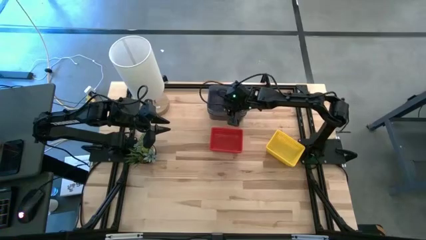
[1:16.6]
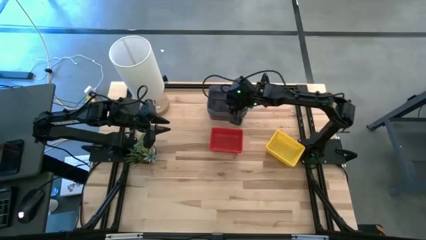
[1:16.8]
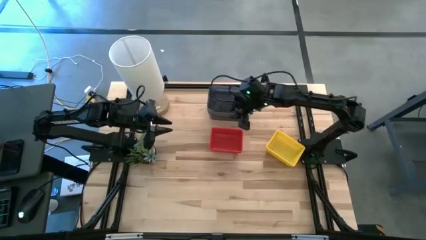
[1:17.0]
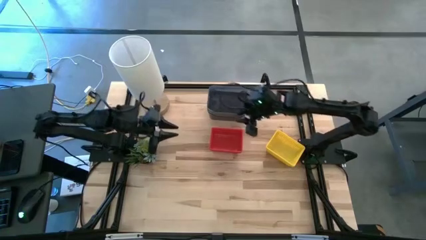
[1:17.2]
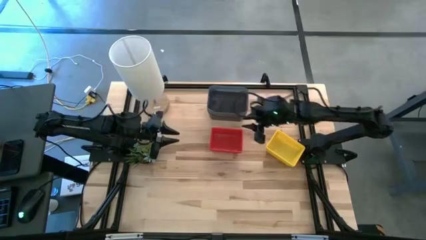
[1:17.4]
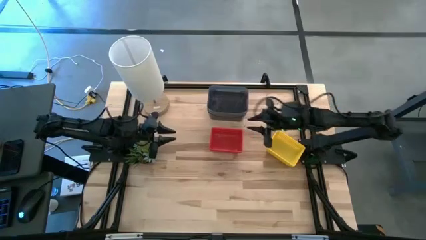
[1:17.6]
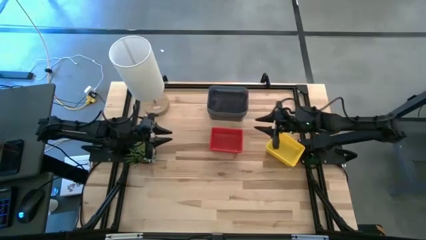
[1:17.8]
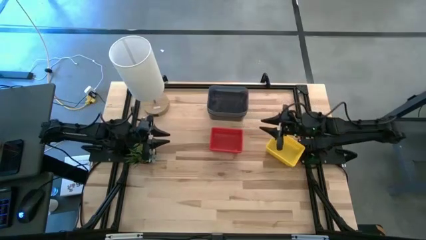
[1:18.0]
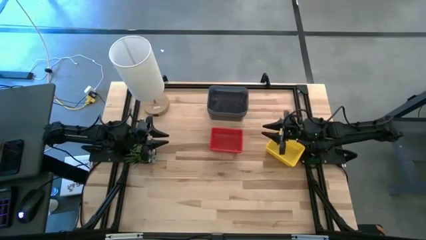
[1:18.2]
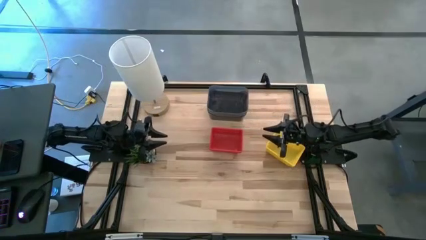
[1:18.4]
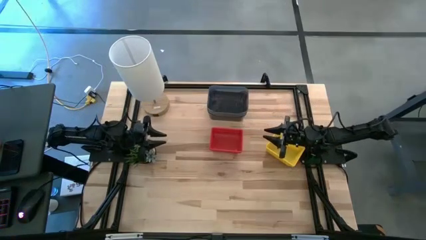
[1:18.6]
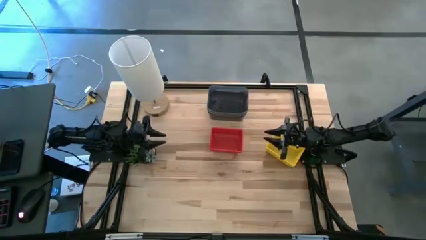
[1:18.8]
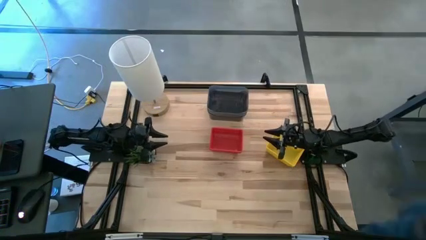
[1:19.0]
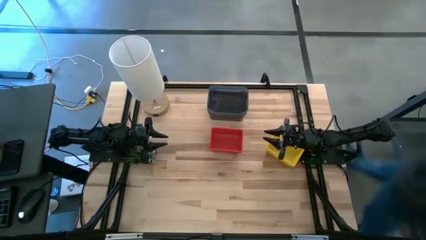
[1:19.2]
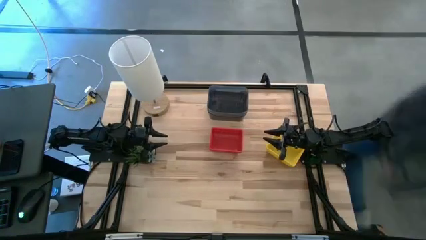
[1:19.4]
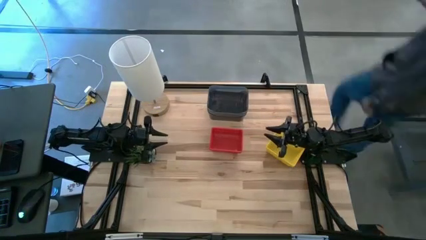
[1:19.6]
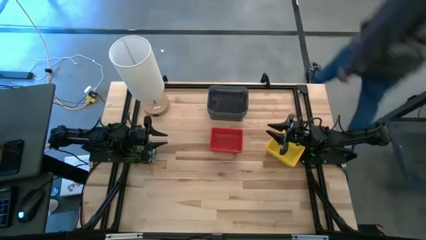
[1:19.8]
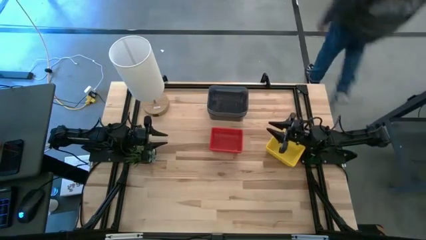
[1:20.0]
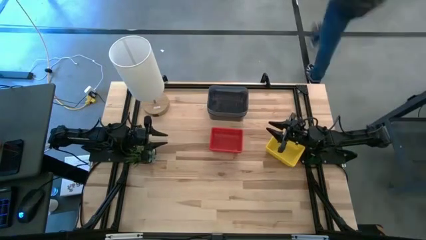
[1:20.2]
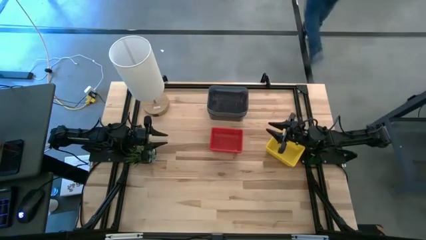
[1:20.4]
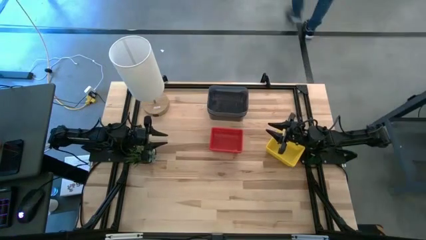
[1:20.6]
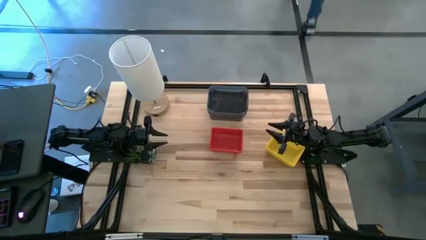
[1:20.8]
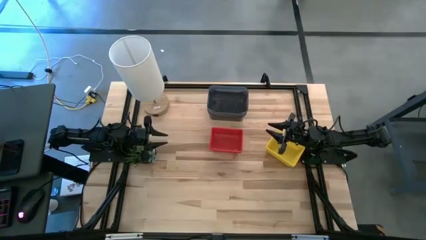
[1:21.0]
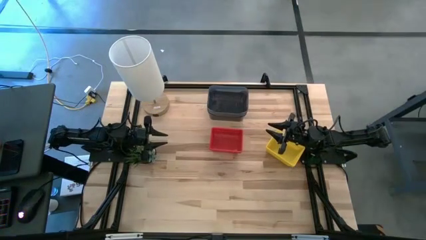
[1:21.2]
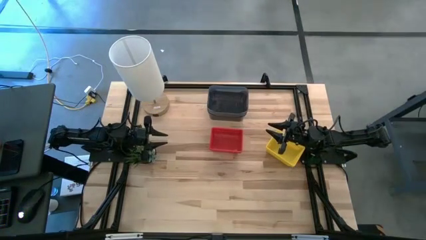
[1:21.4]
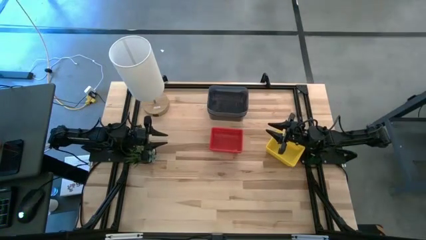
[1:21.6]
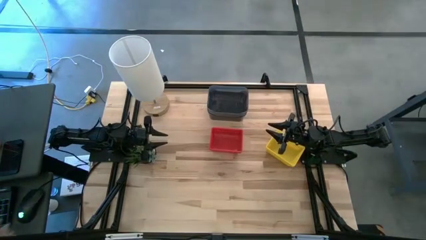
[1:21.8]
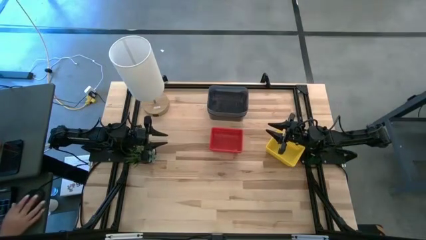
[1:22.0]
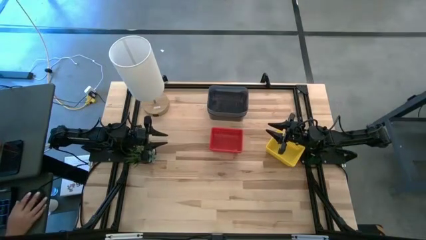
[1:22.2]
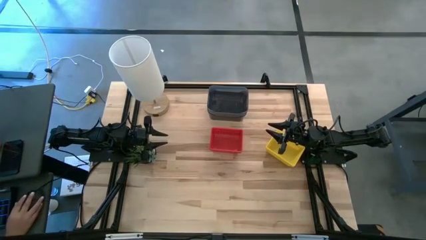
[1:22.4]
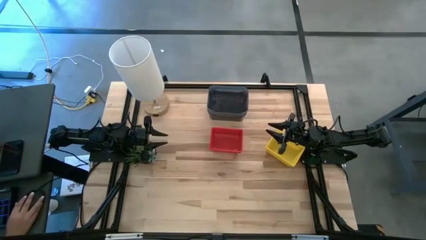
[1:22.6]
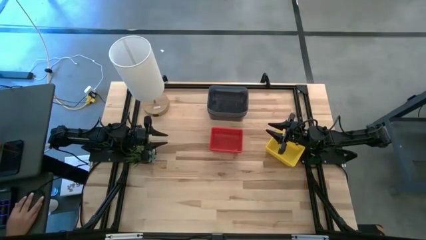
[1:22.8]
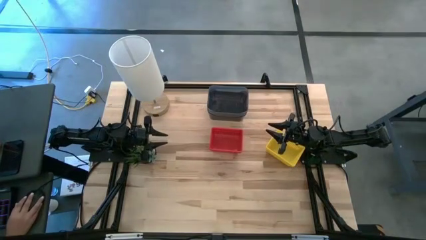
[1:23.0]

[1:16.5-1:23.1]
Return to Home Position

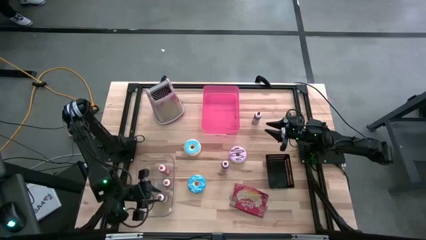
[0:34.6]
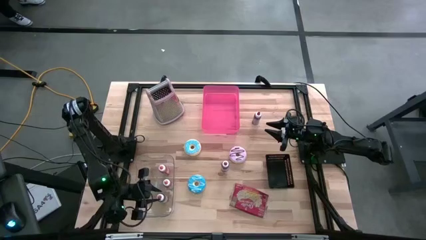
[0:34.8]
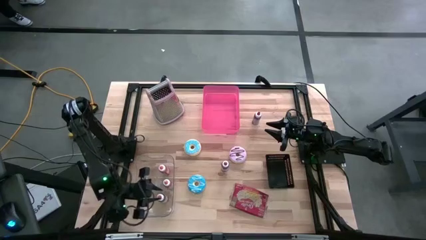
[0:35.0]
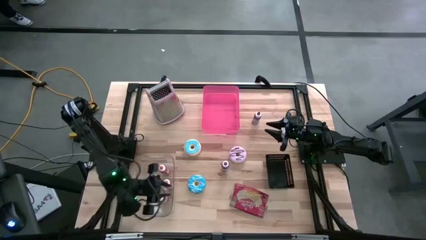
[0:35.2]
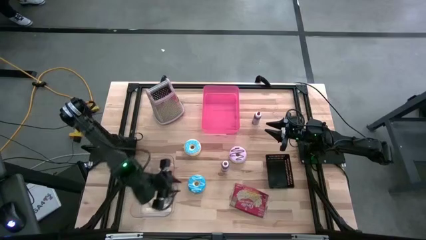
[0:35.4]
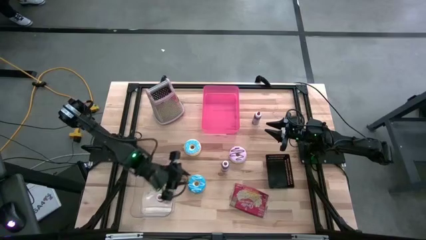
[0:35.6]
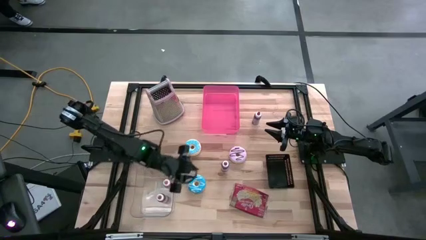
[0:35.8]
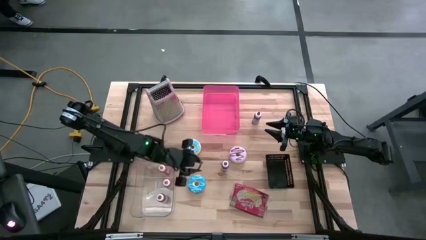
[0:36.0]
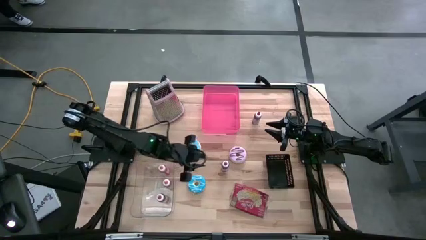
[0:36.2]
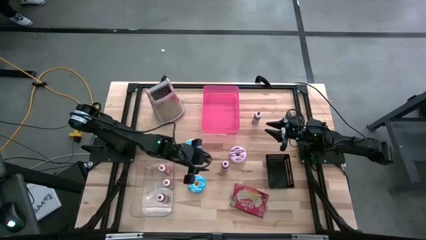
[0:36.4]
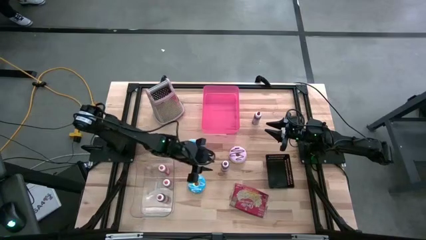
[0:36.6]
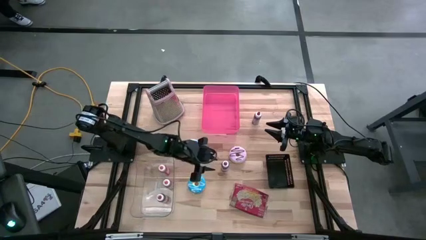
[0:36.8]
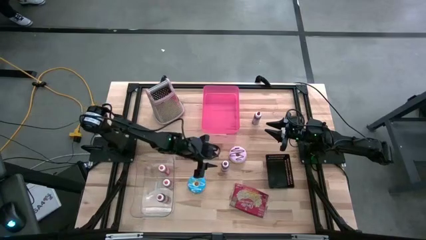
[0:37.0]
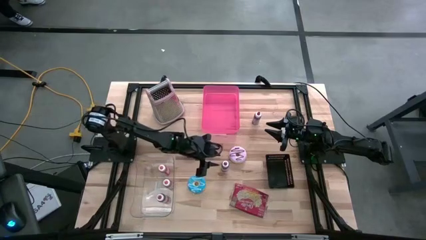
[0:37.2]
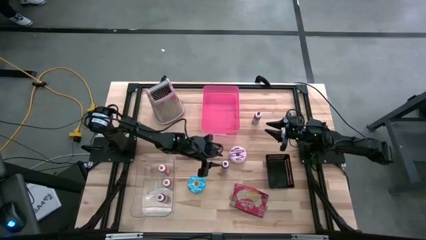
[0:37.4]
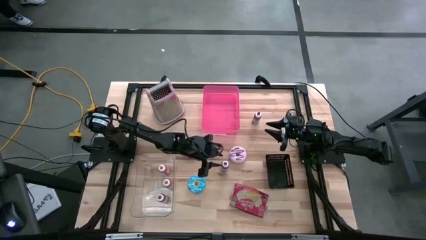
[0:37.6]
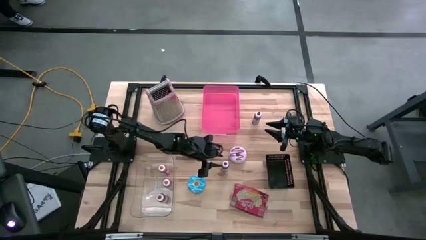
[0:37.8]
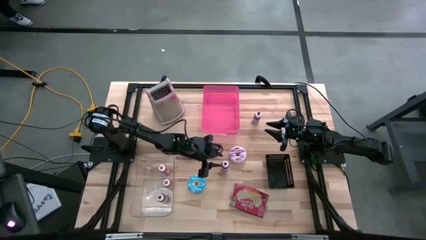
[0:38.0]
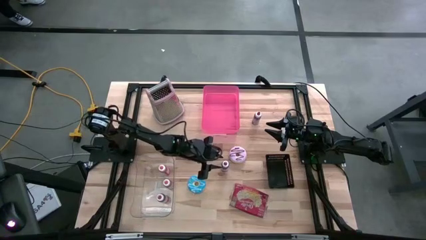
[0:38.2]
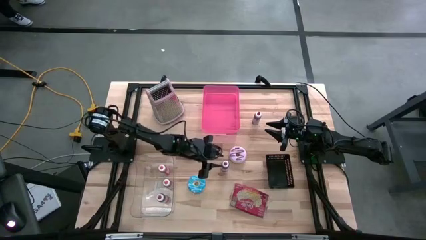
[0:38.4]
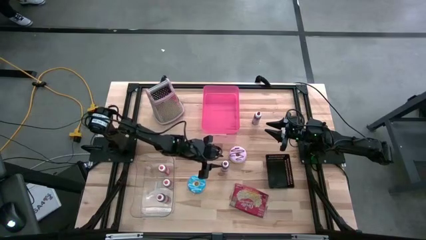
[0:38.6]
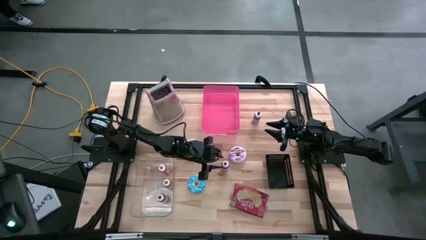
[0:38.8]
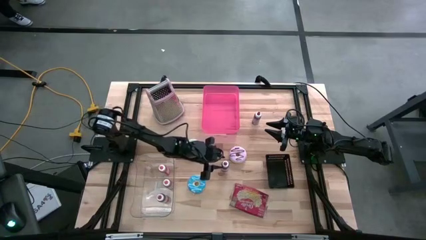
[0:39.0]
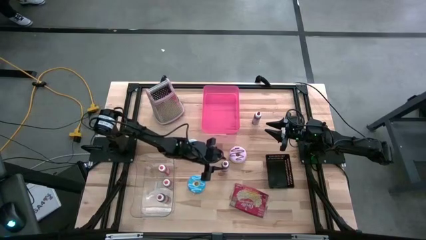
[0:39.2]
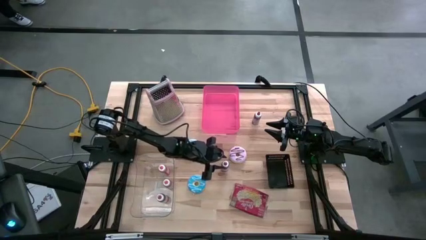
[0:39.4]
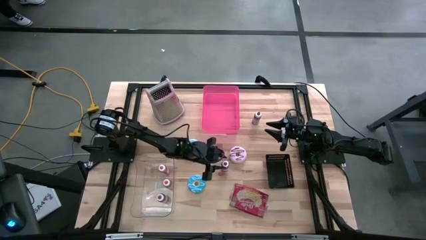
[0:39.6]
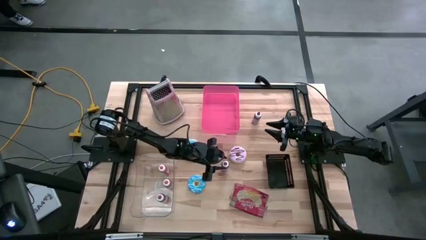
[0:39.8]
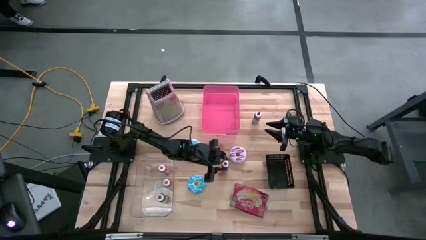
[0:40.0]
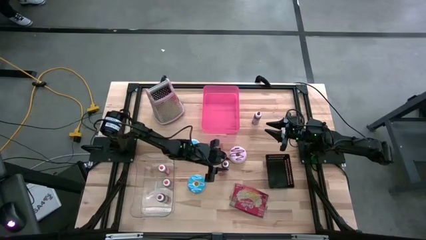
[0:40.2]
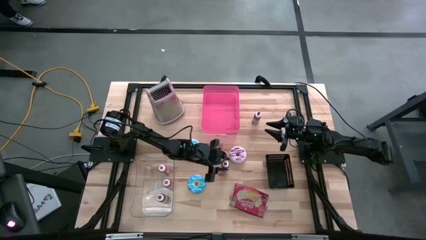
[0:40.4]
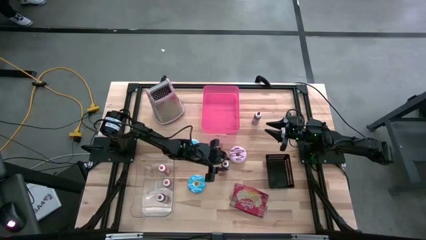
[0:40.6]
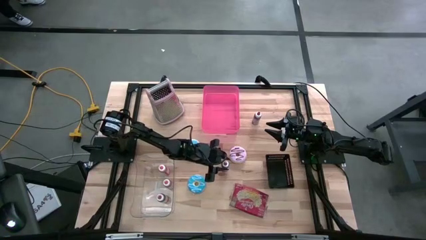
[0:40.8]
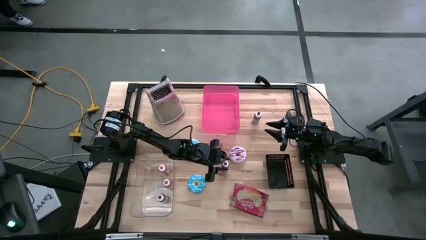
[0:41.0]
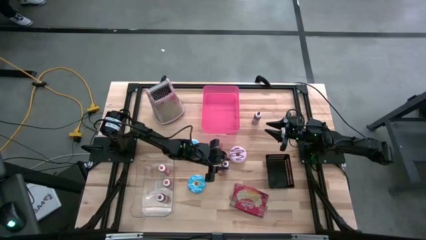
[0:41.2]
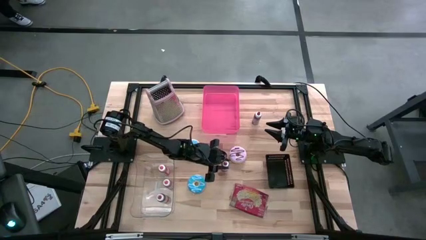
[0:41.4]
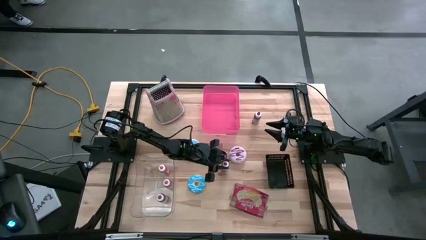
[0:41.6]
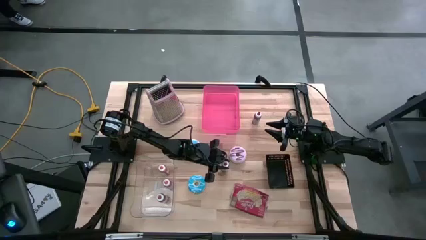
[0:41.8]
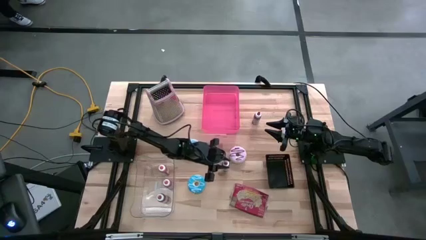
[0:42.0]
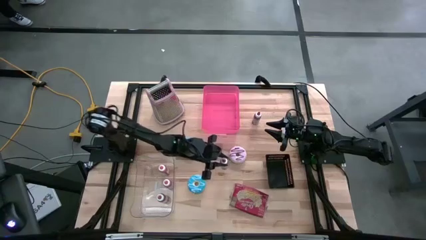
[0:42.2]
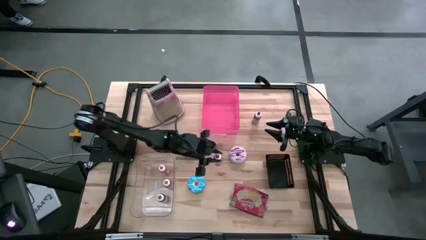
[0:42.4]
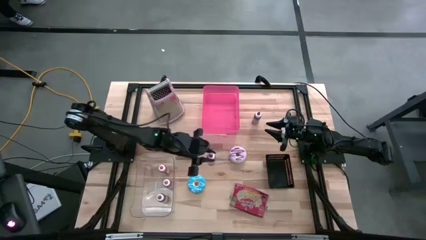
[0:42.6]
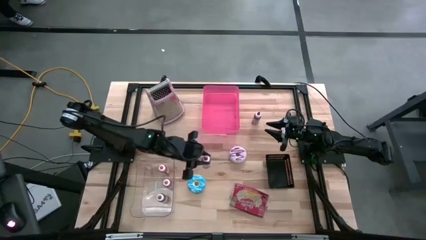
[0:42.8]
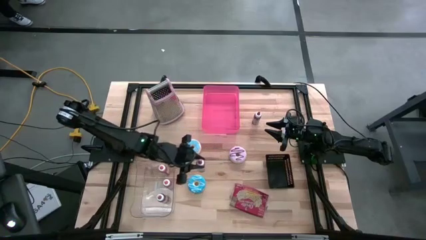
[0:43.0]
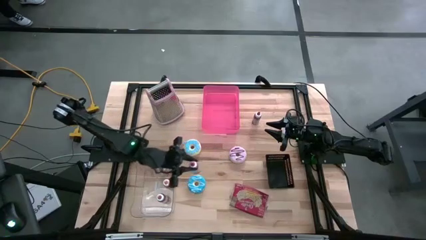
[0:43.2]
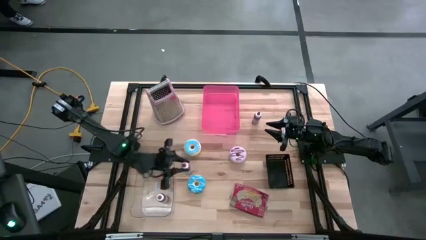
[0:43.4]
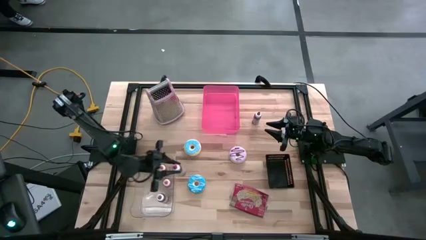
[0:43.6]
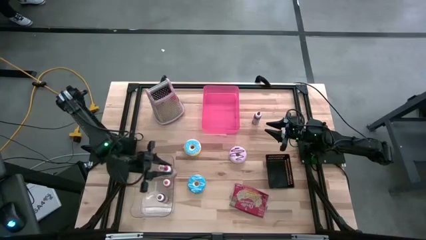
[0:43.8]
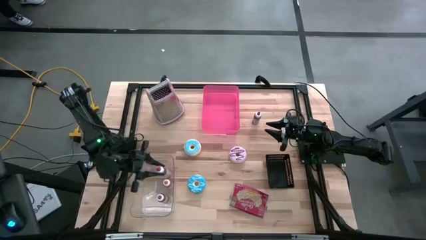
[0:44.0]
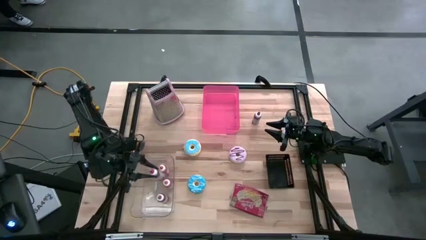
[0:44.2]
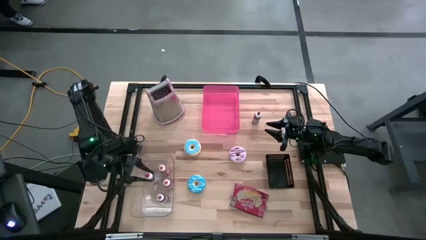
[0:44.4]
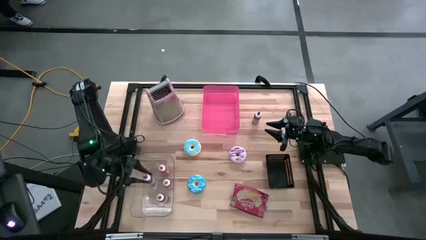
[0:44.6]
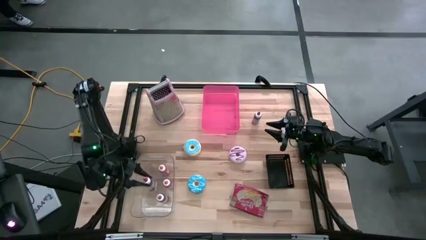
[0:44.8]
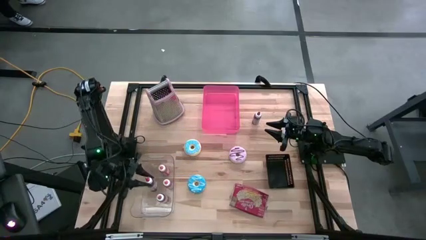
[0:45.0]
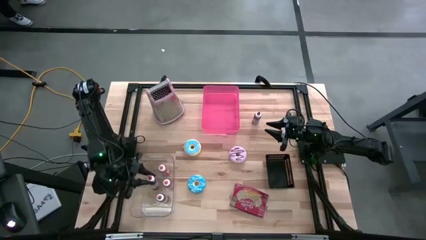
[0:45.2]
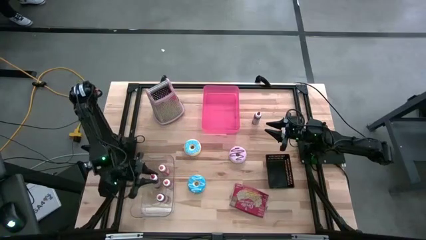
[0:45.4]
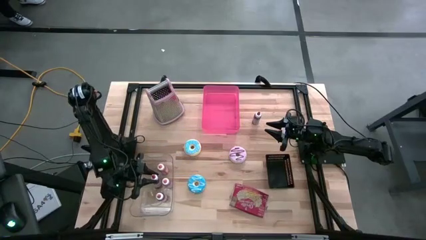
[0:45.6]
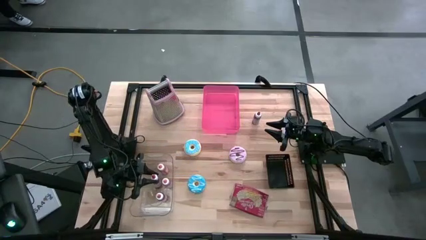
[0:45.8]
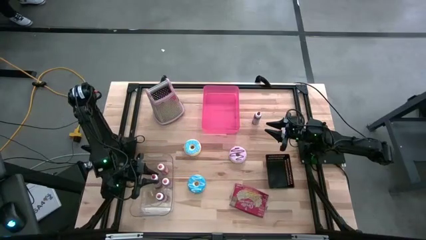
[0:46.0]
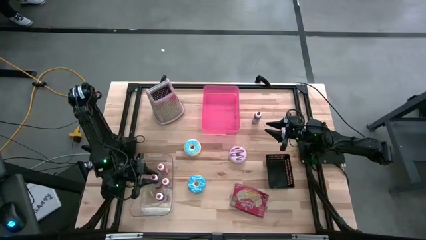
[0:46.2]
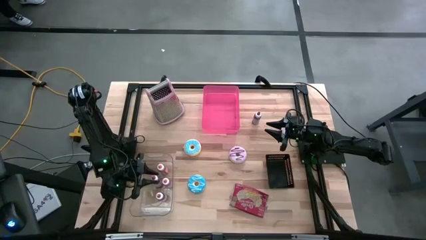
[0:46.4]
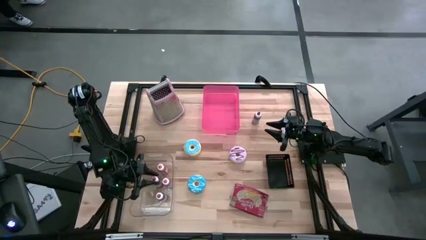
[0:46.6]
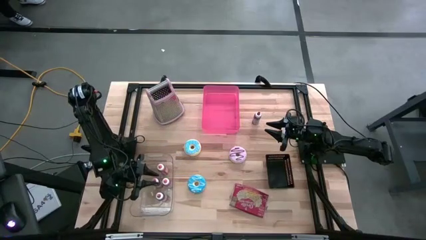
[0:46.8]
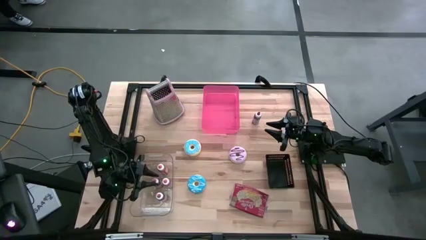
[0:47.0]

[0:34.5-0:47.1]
Put the middle right red large food coloring bottle into the transparent bin
